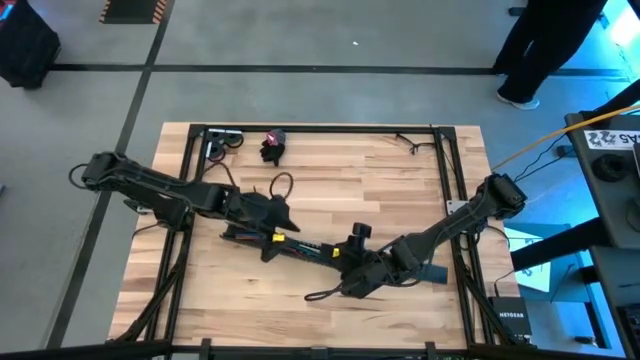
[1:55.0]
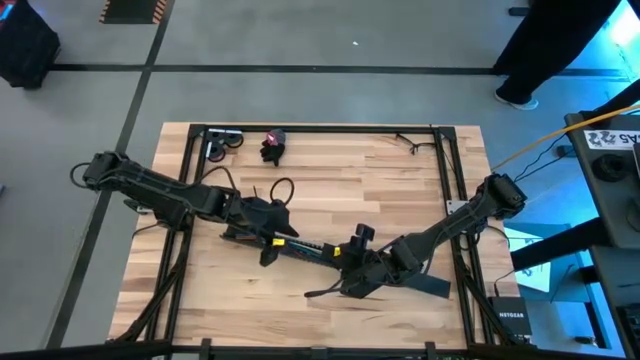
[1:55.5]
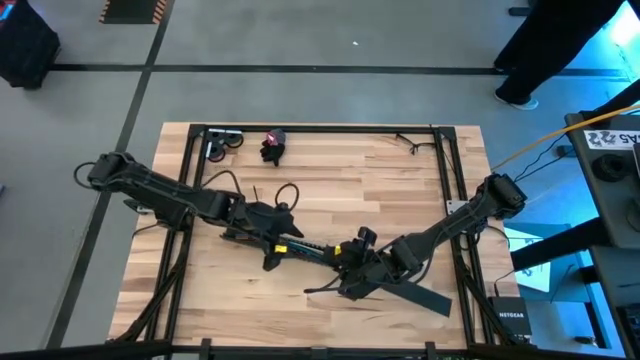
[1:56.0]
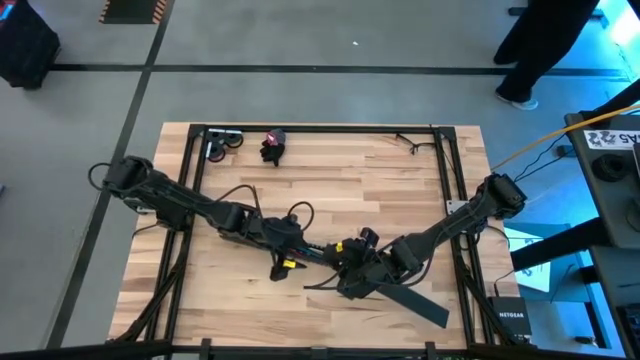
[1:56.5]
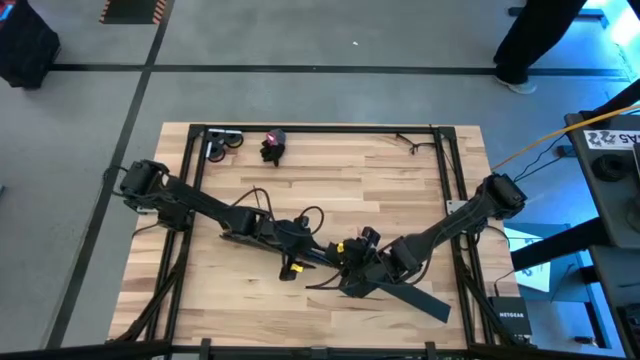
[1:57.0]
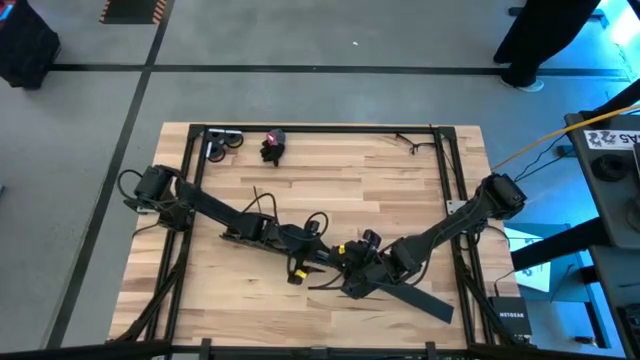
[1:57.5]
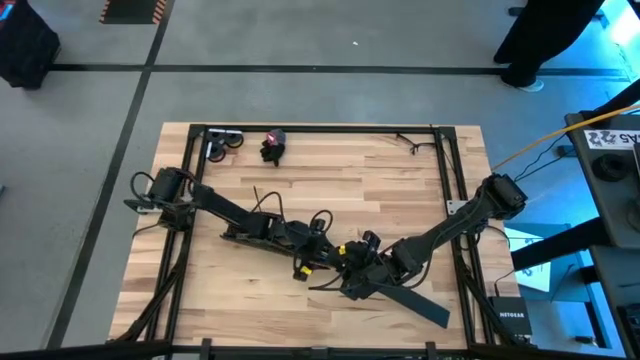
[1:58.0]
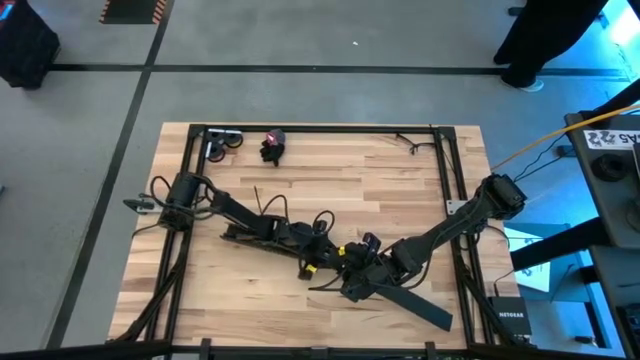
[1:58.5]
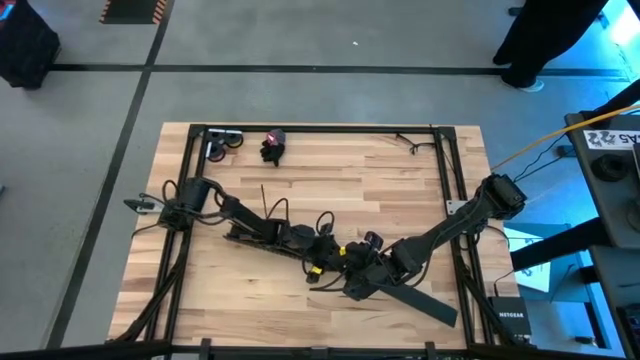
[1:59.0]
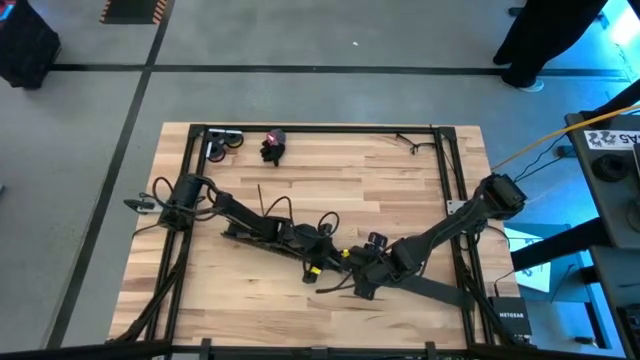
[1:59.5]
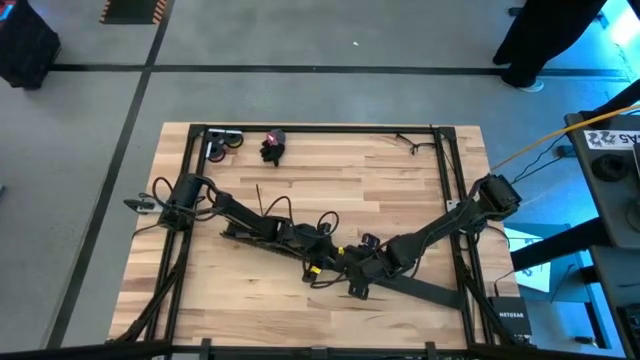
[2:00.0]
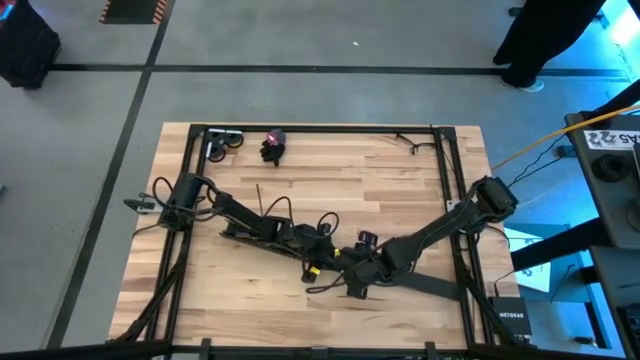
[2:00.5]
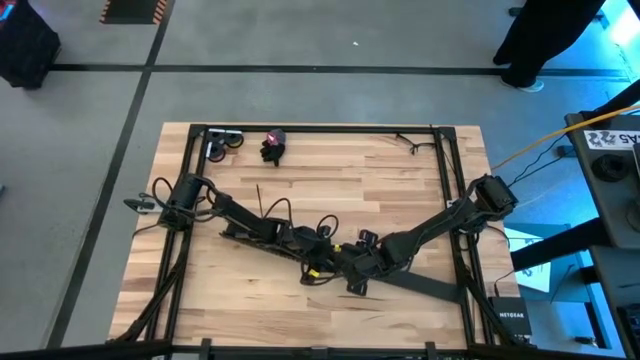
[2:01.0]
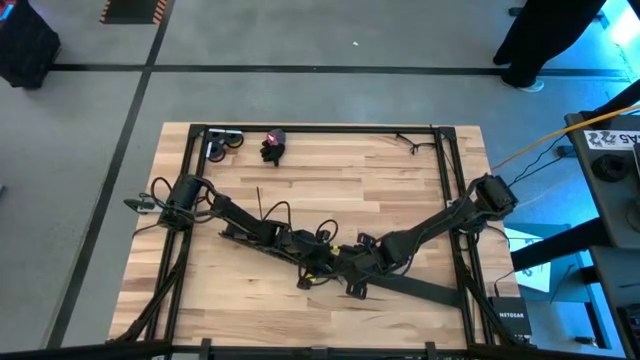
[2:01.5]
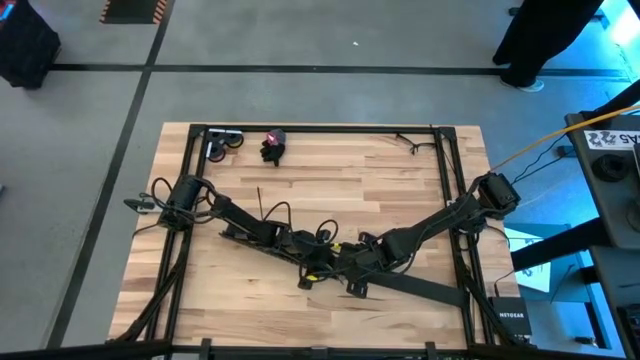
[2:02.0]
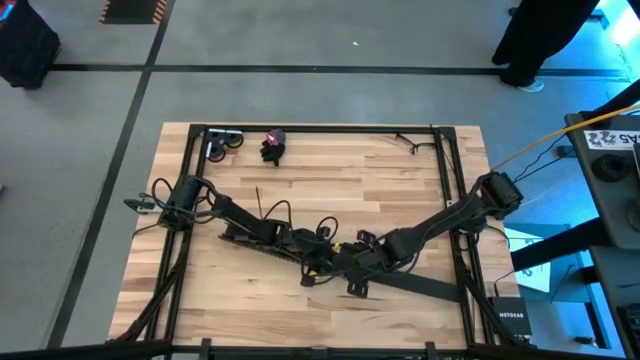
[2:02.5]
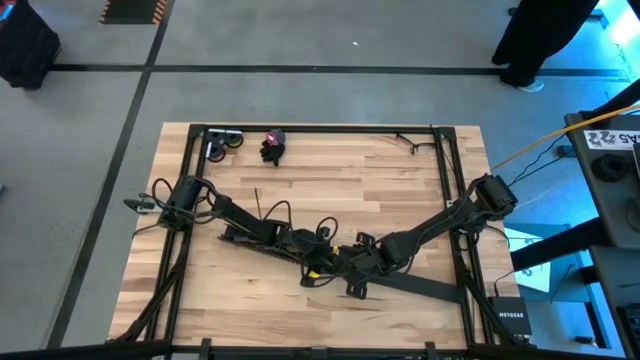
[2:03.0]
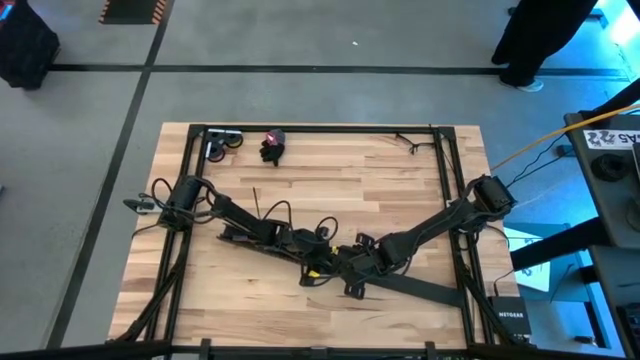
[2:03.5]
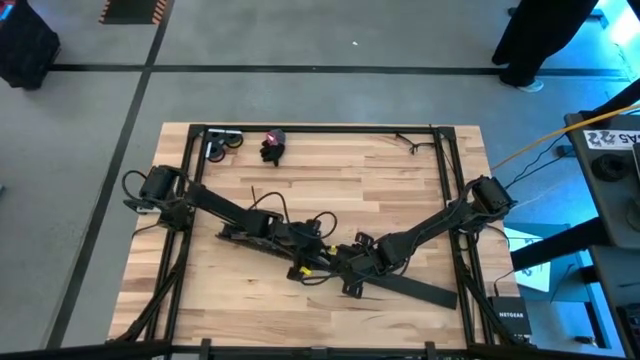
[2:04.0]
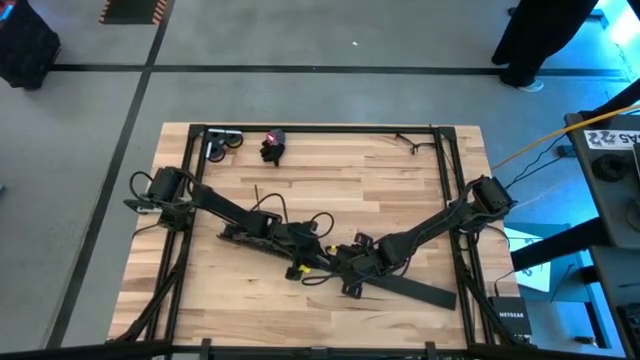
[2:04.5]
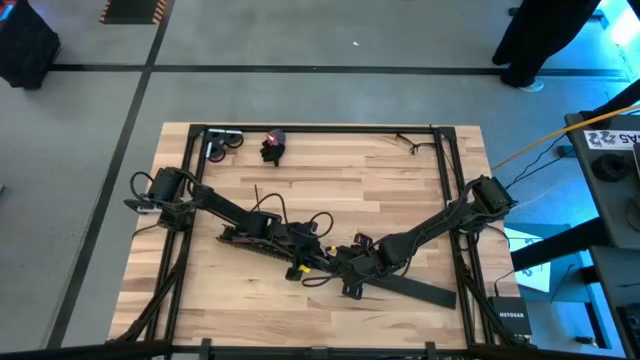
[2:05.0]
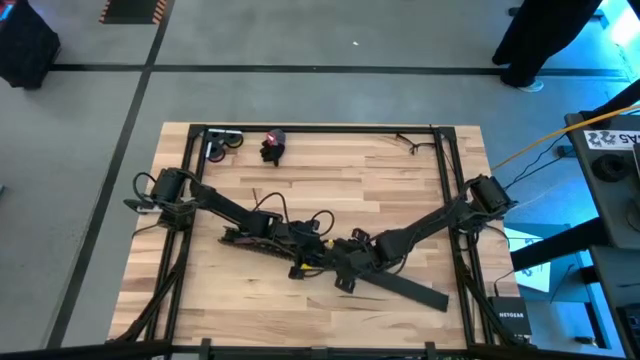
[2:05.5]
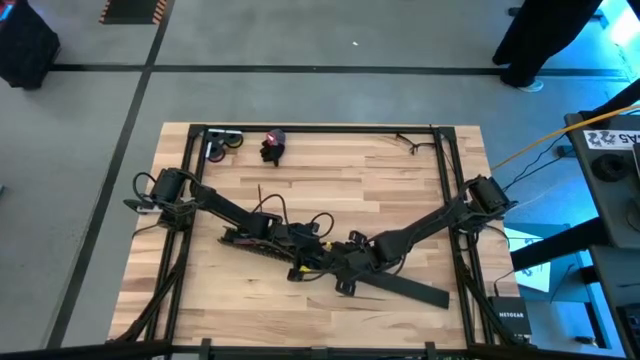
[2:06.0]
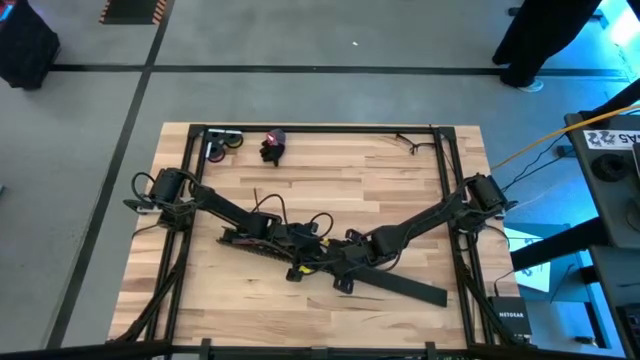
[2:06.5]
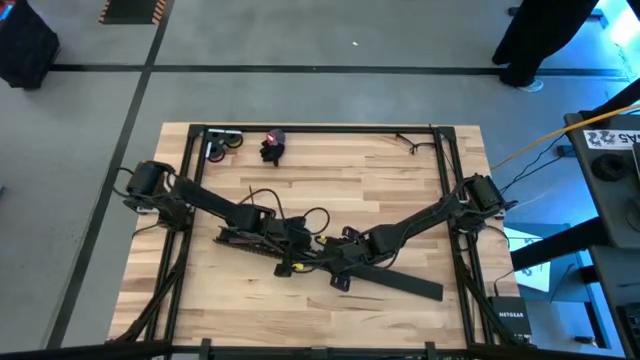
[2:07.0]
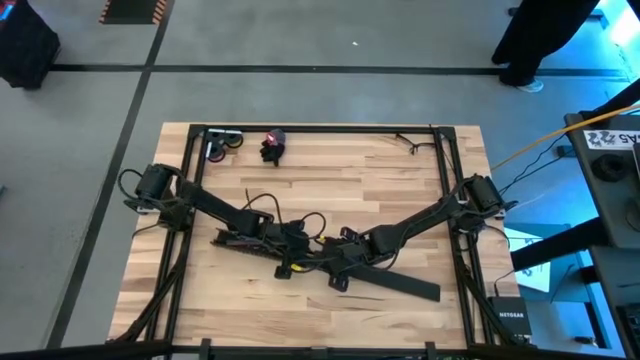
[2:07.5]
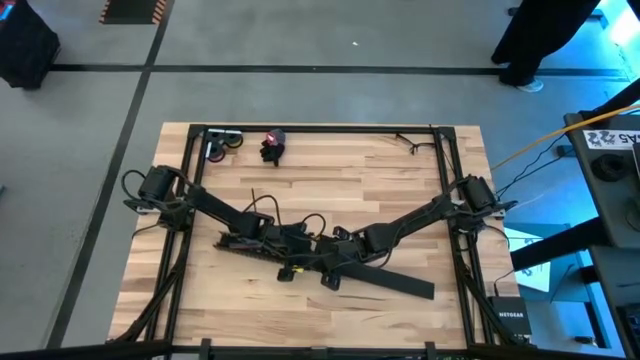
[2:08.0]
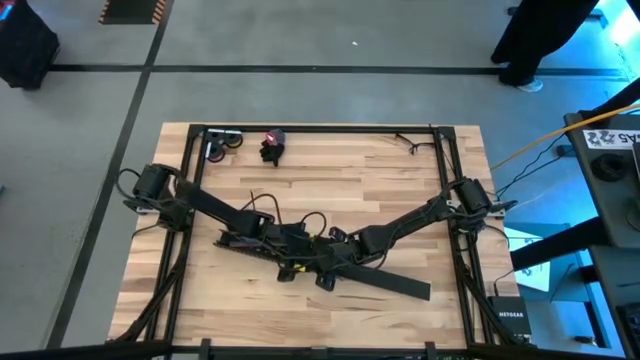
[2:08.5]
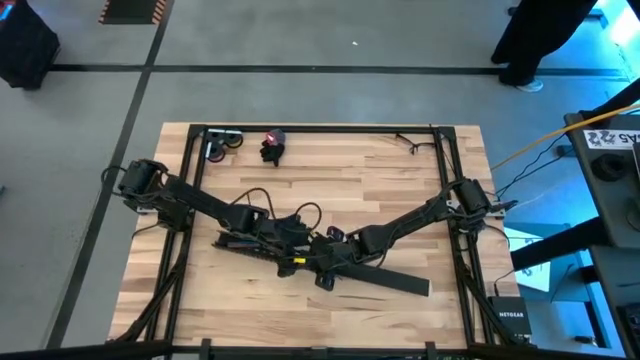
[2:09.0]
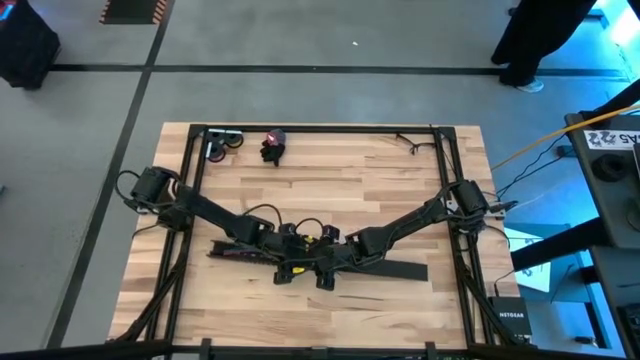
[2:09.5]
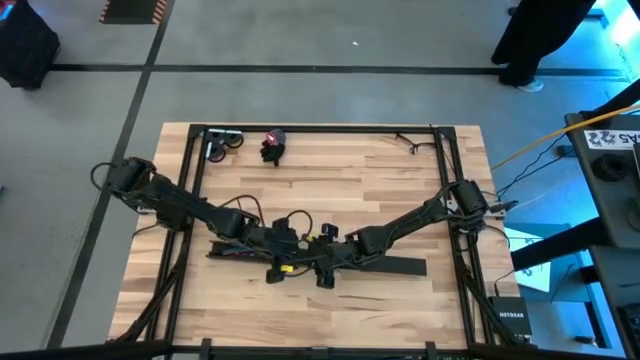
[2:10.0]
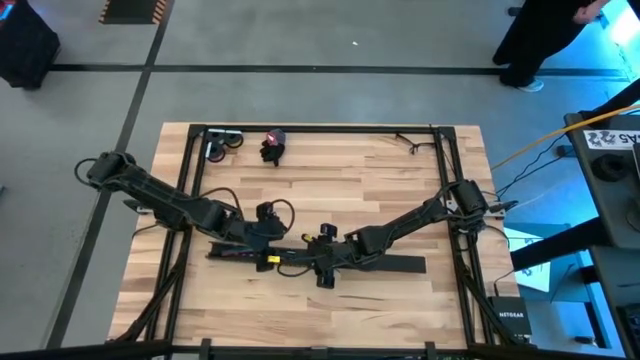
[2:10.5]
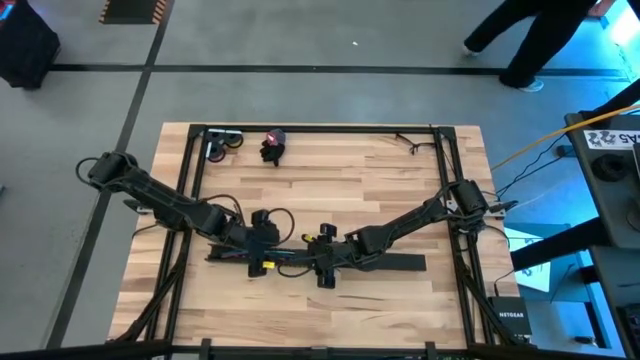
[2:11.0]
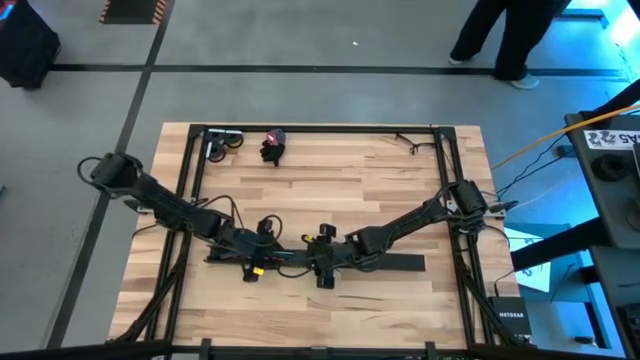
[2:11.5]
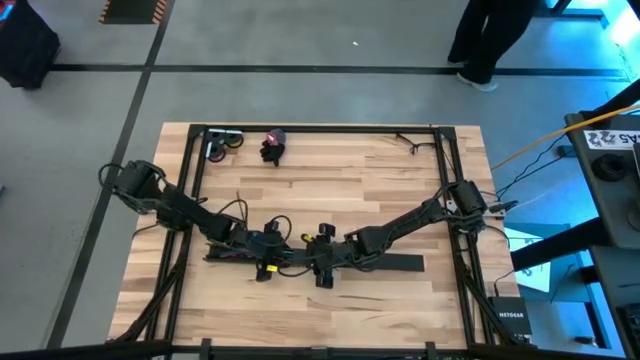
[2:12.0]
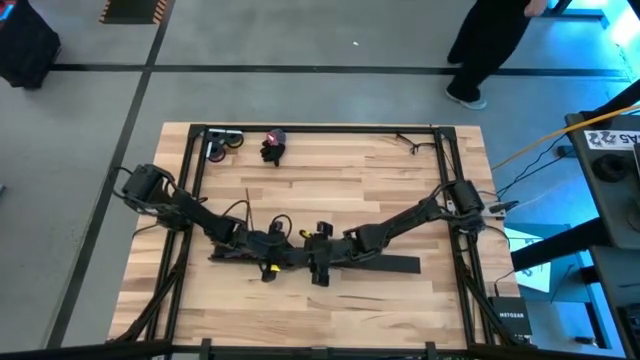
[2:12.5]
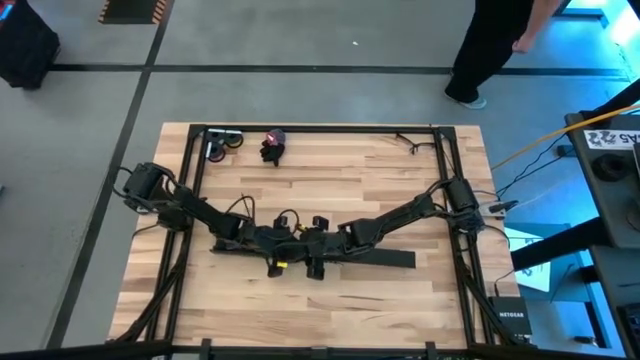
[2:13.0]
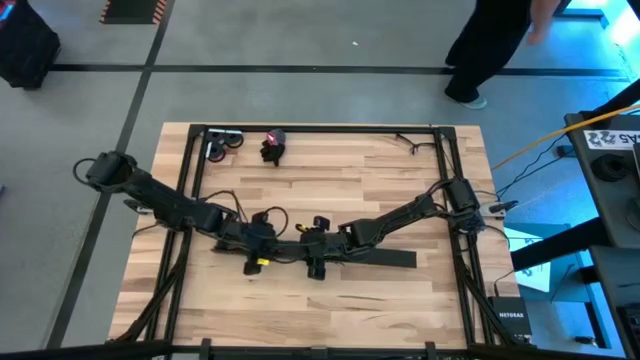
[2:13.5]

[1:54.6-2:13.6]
Task: Ziptie cables
Close the black cable duct

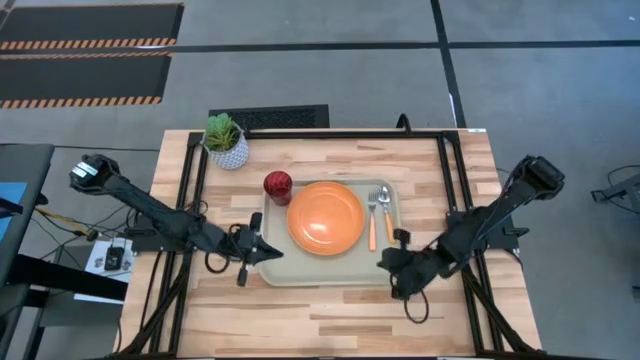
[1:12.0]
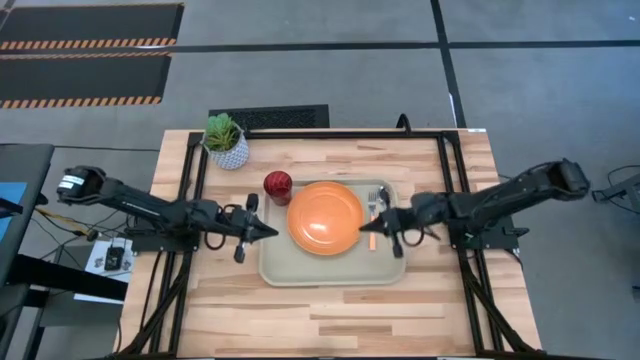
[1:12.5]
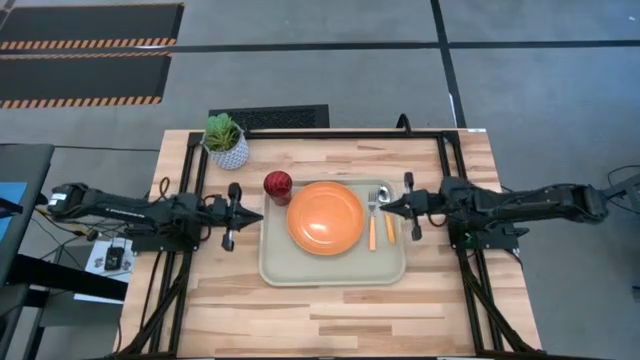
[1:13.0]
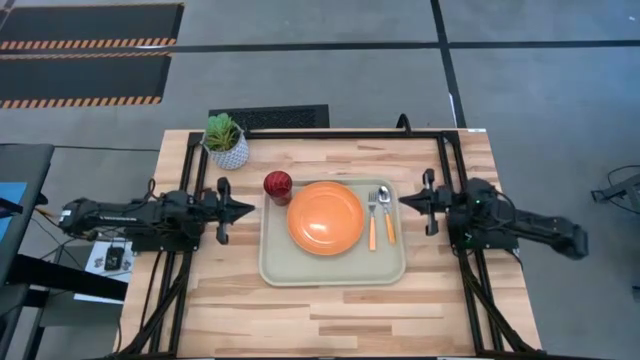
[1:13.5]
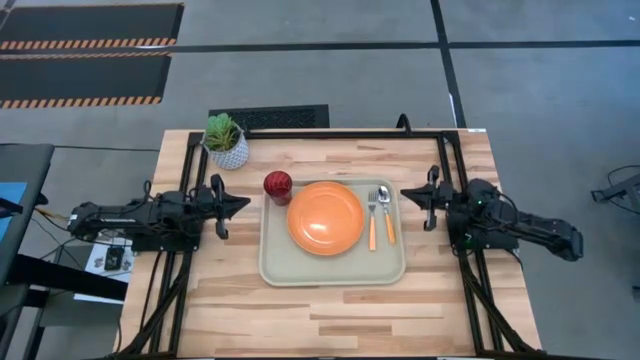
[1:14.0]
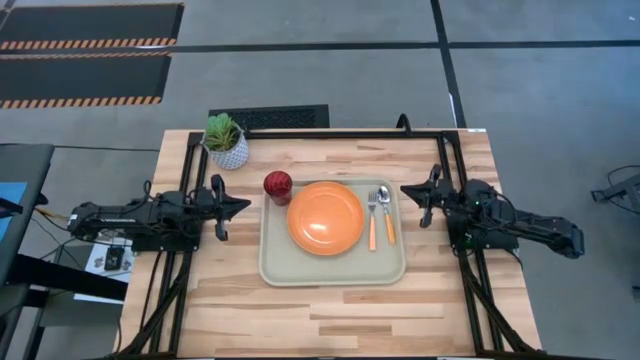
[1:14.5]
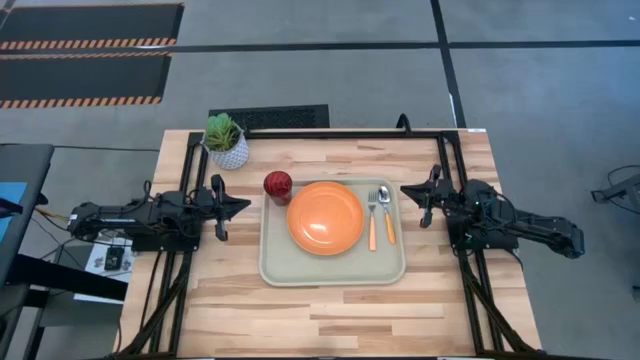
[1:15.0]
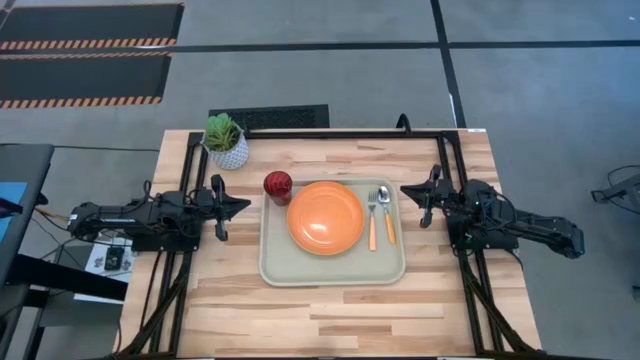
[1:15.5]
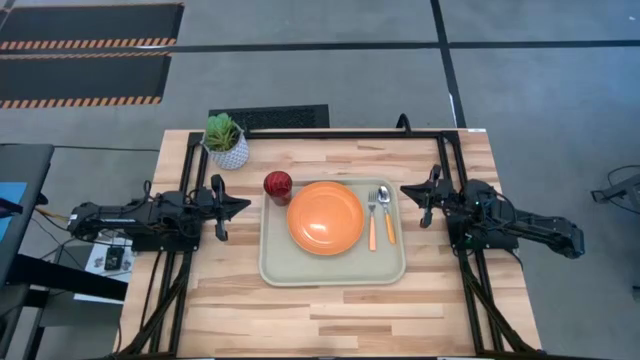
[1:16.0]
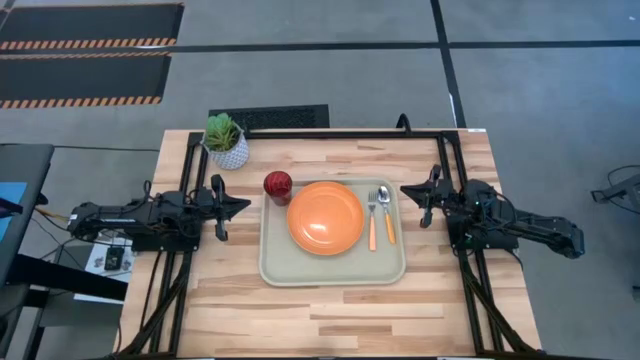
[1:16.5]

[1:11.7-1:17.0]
Task: Pick and place plate/cup/fork/spoon on tray
Return to Home Position
